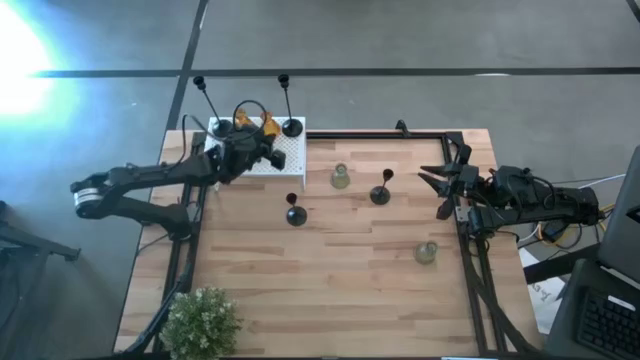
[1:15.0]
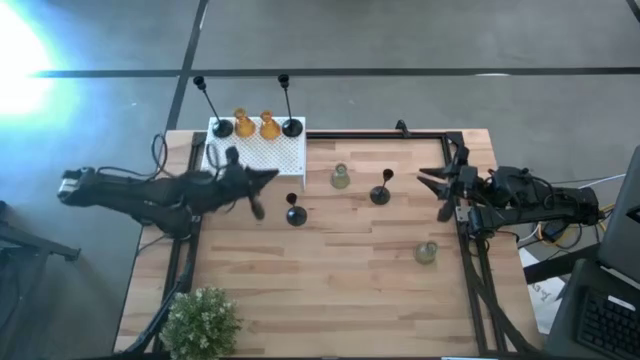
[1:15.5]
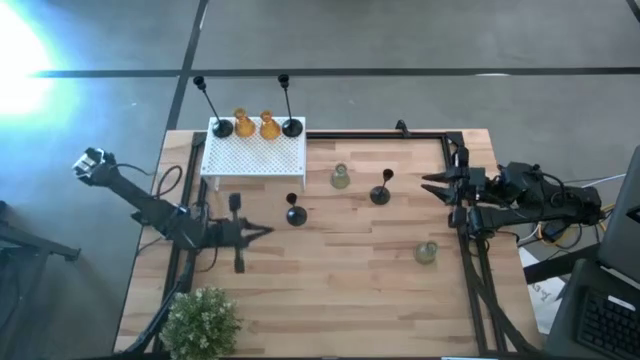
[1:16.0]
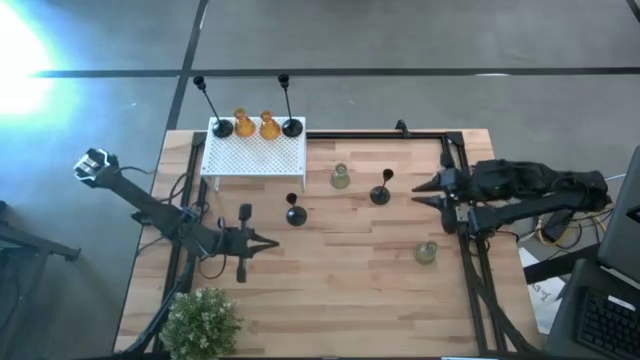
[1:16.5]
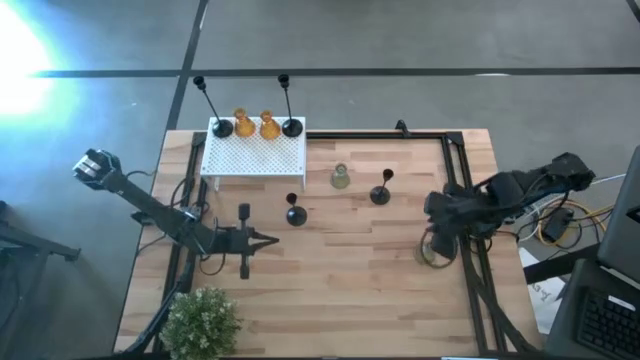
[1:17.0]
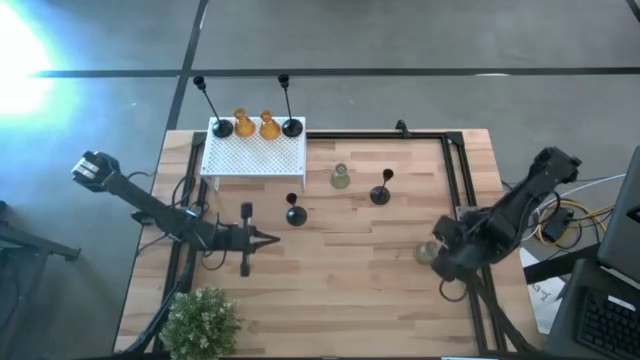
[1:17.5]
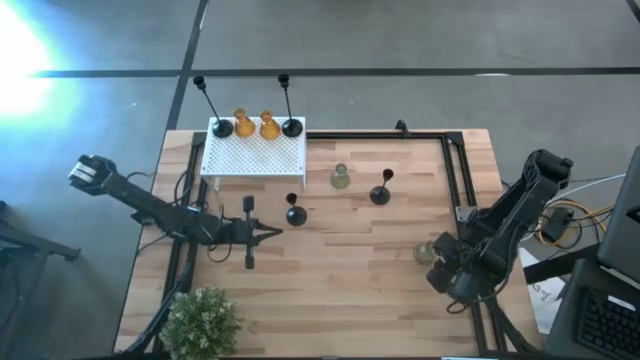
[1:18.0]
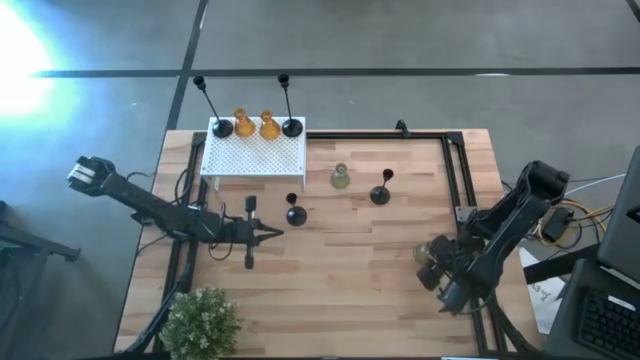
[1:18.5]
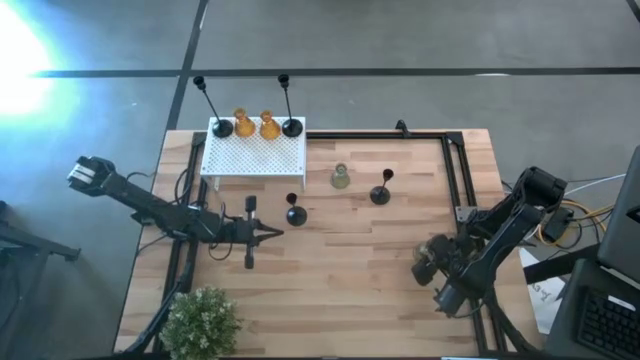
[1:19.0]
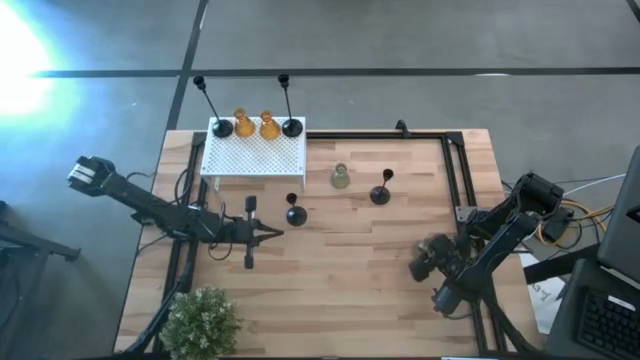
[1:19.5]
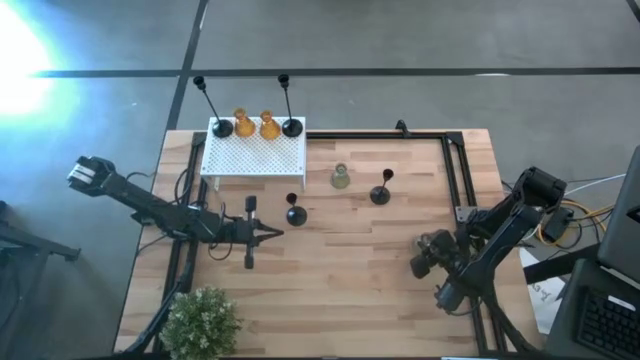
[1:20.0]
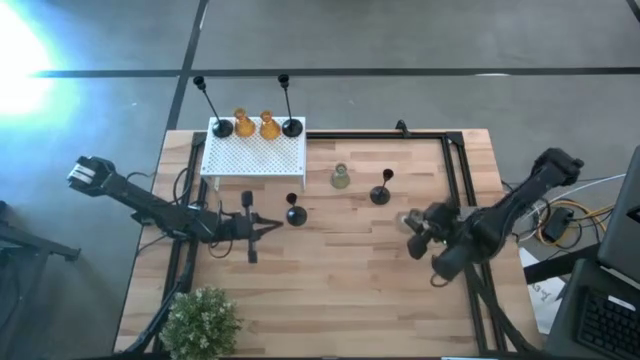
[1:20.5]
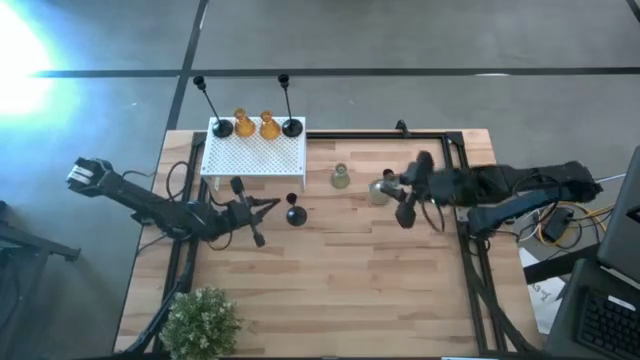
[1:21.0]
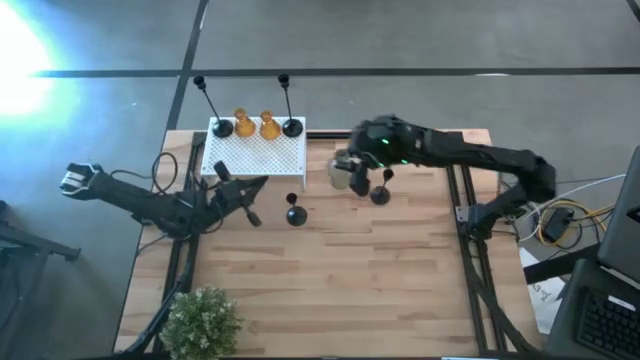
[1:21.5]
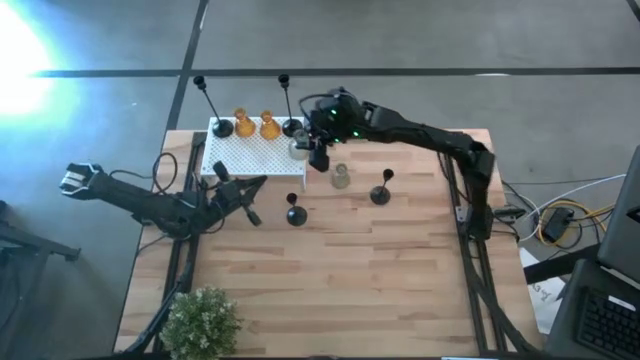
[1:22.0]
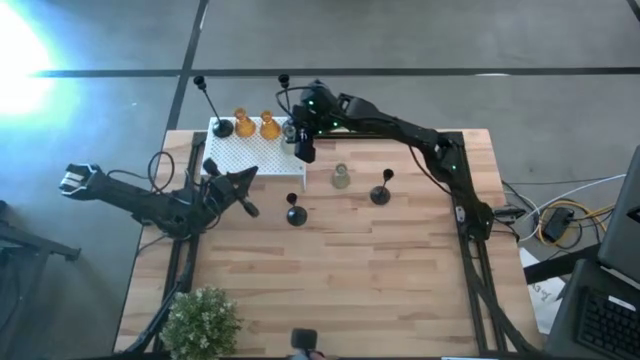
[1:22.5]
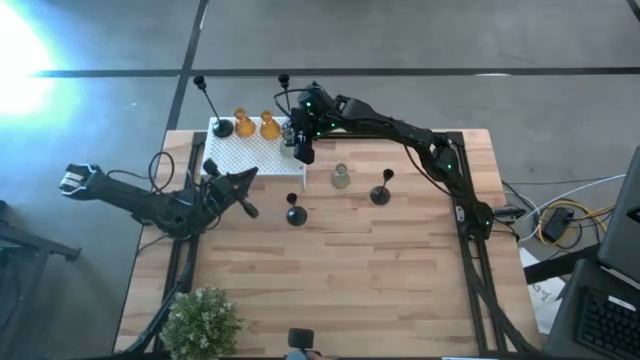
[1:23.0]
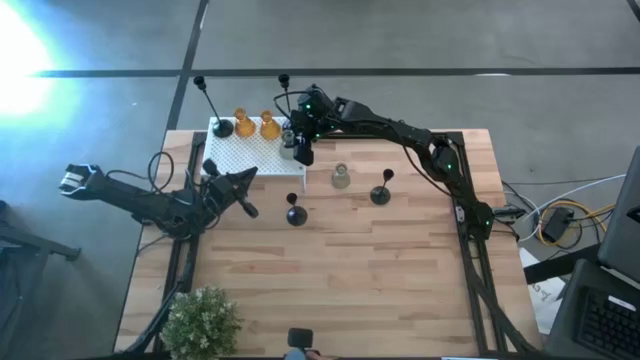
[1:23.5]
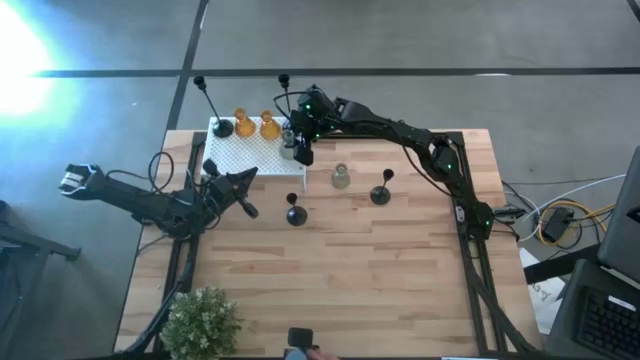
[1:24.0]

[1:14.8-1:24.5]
Task: Pick & Place candle stick holders
Put the bottom transparent candle holder on the shelf

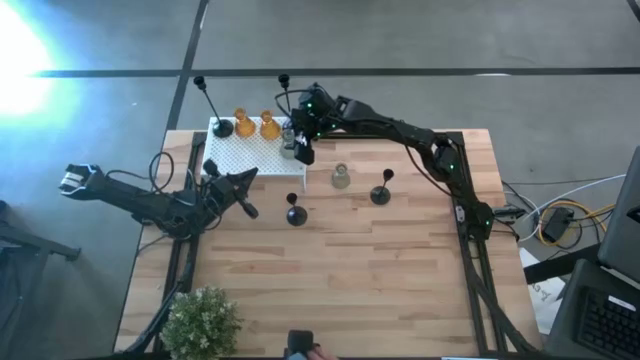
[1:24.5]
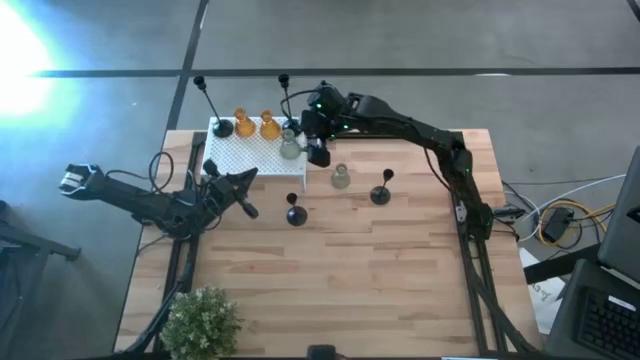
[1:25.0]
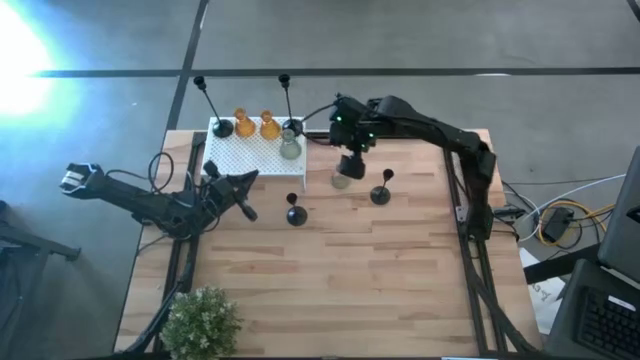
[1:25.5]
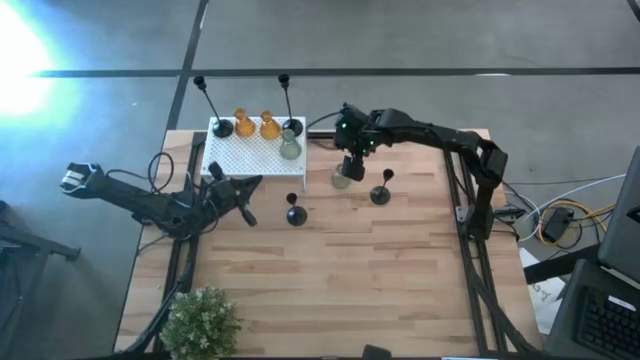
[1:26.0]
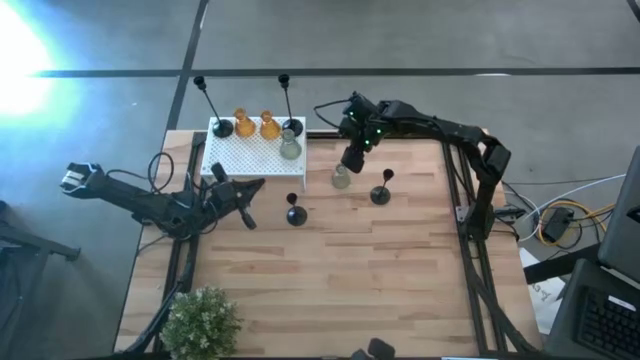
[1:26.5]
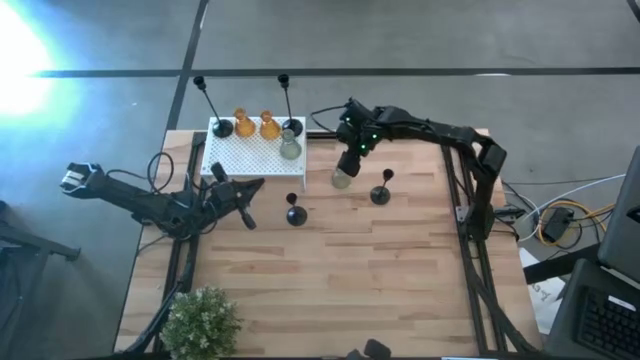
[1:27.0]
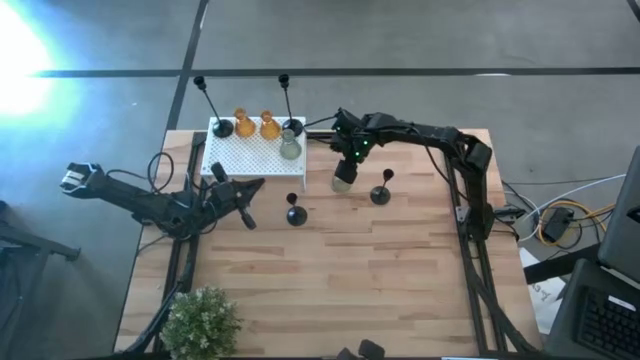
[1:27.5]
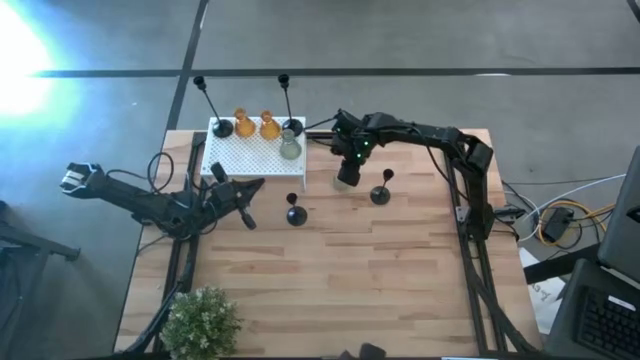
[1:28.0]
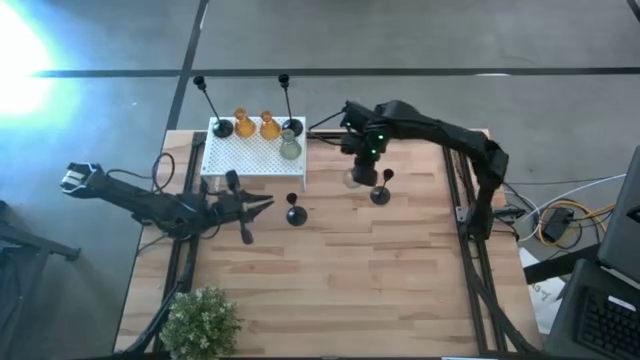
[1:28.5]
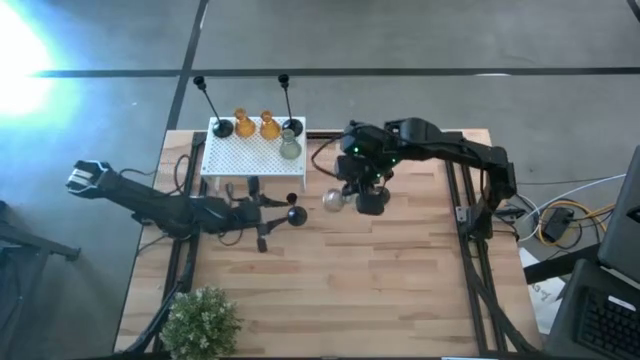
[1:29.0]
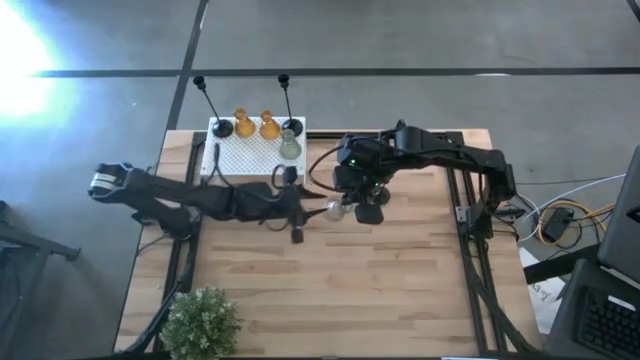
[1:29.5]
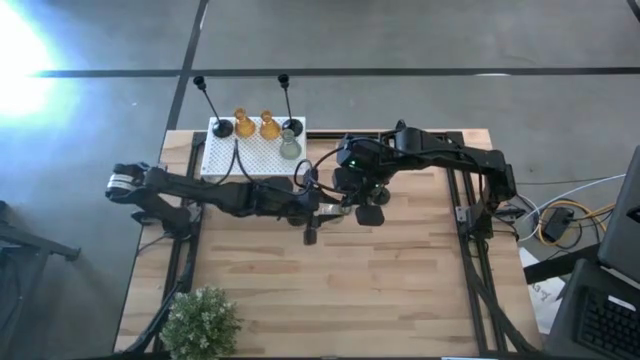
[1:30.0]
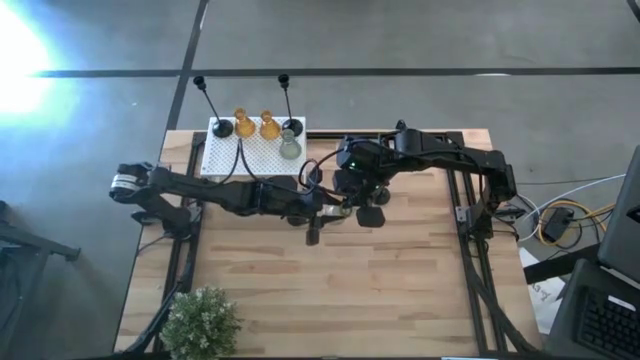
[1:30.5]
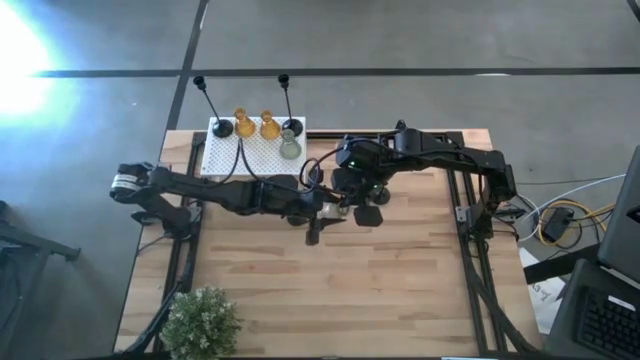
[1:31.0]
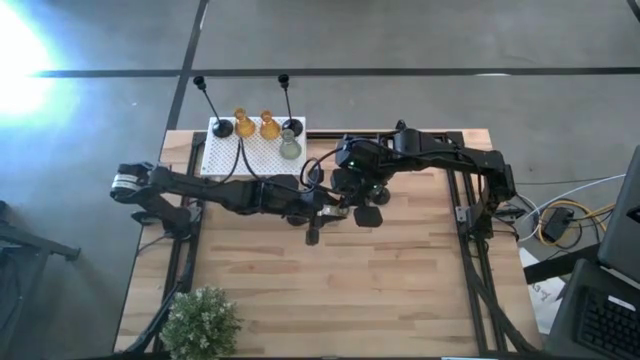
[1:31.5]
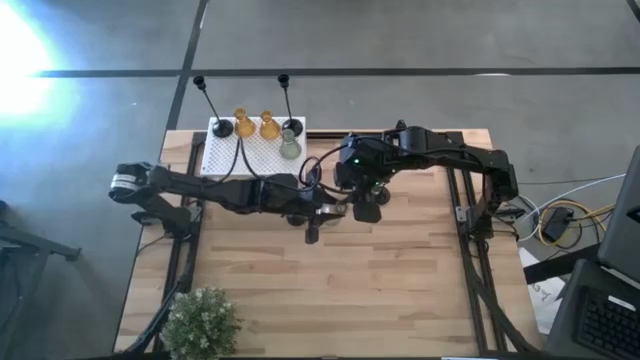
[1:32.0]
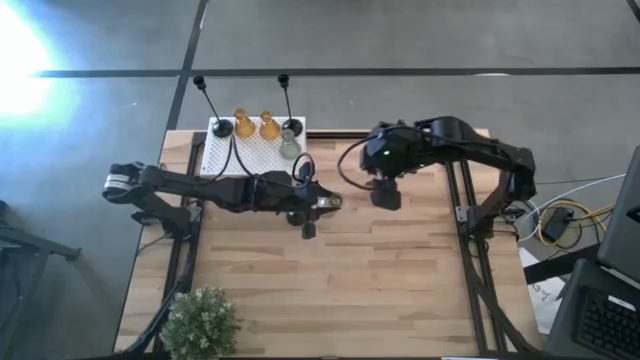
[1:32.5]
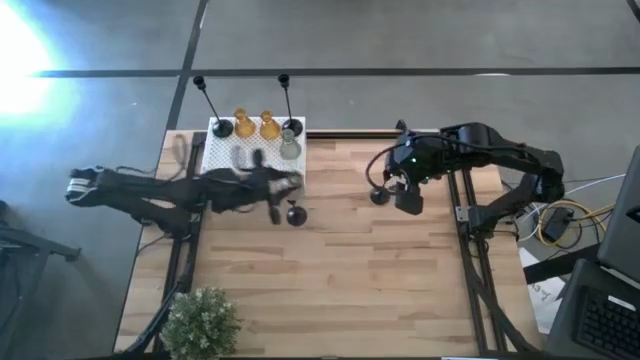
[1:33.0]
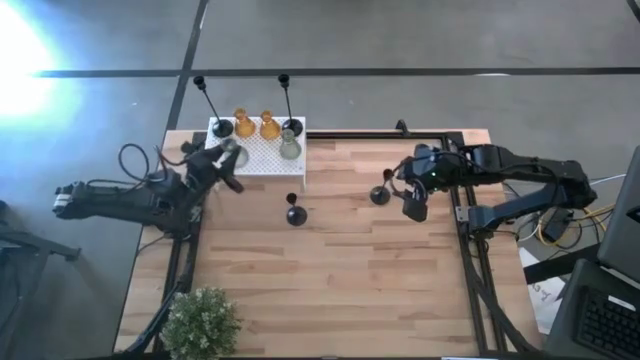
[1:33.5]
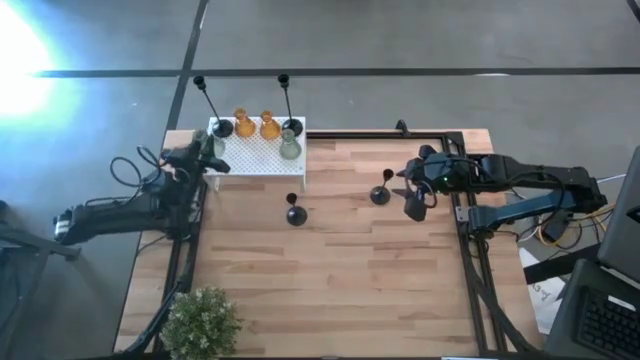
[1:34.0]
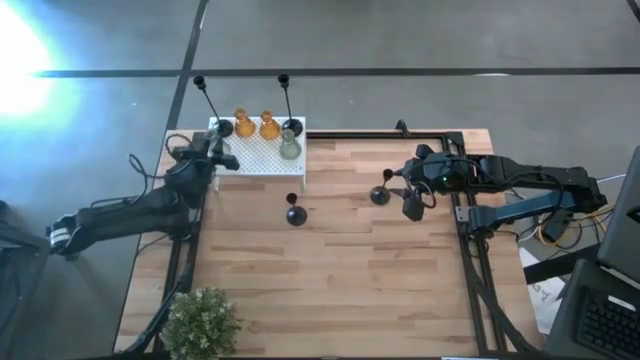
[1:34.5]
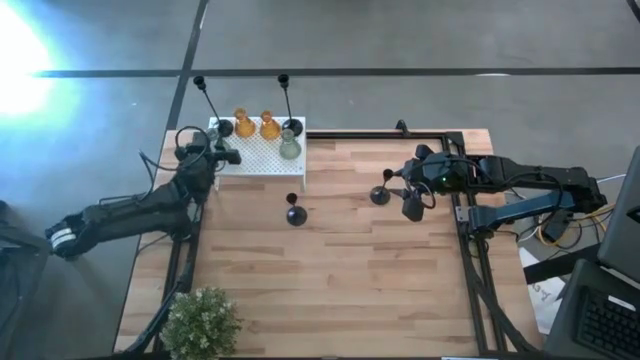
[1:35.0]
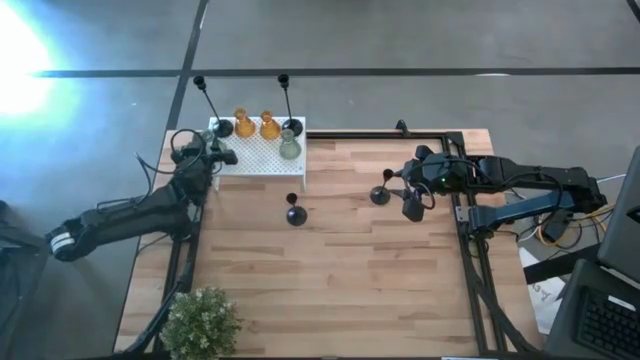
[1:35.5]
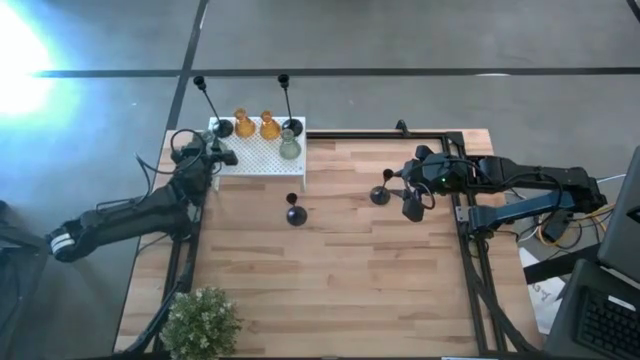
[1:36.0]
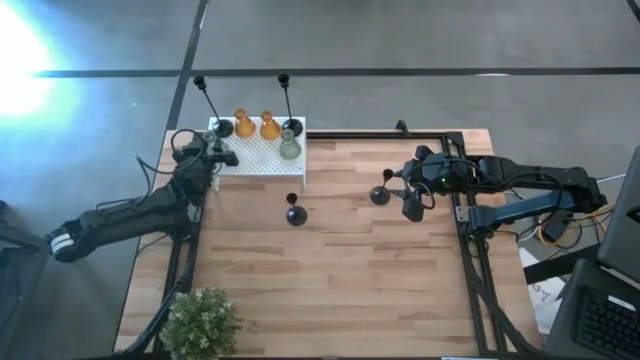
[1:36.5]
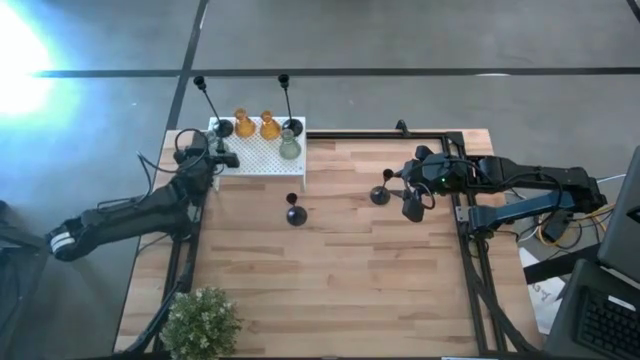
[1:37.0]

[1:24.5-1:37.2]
Put the transparent candle holder on the shelf
